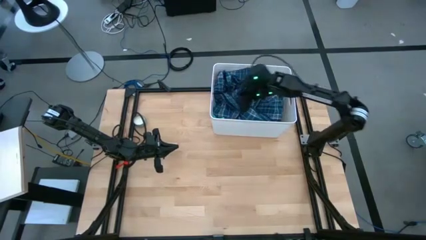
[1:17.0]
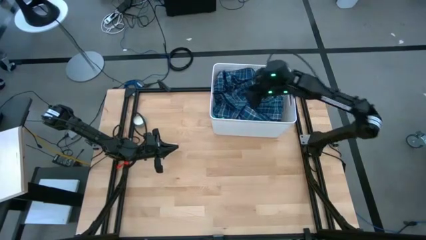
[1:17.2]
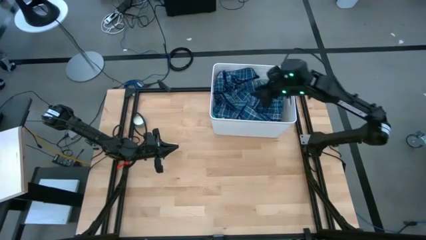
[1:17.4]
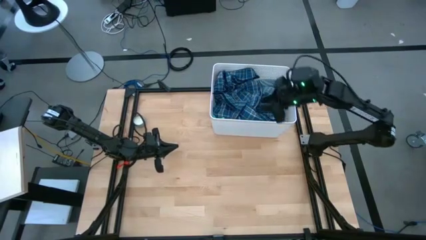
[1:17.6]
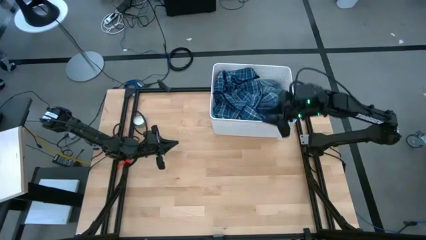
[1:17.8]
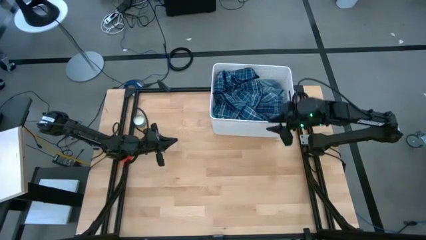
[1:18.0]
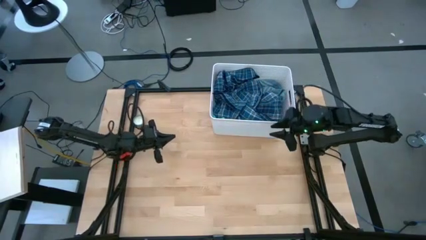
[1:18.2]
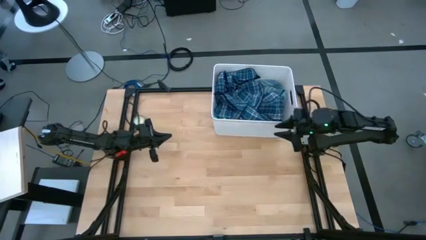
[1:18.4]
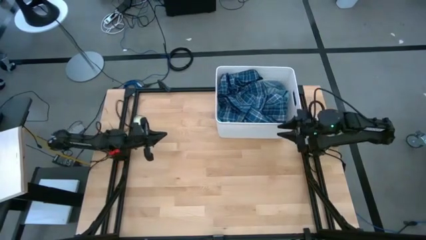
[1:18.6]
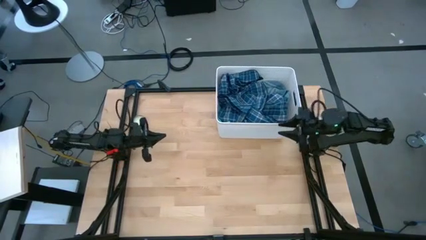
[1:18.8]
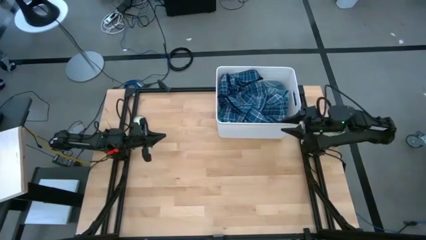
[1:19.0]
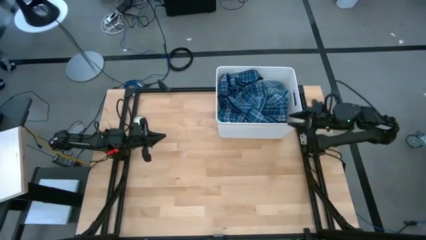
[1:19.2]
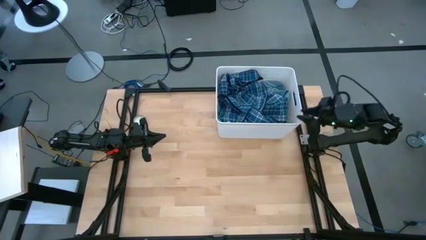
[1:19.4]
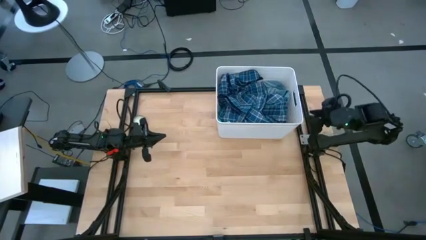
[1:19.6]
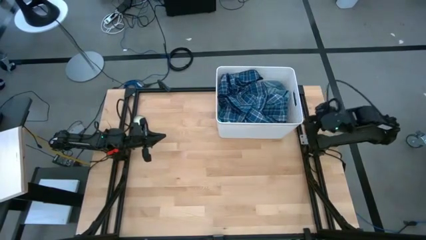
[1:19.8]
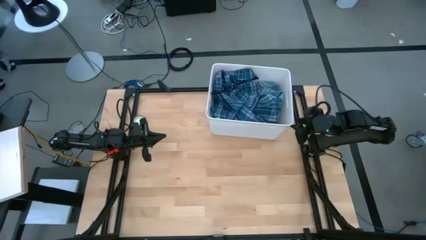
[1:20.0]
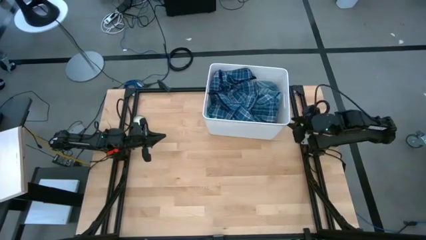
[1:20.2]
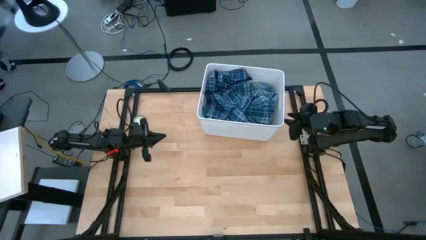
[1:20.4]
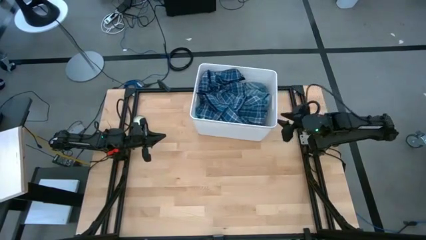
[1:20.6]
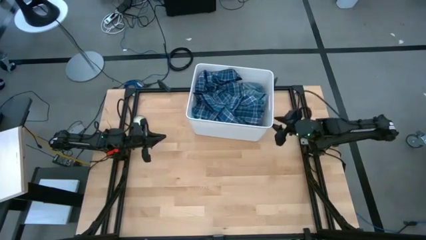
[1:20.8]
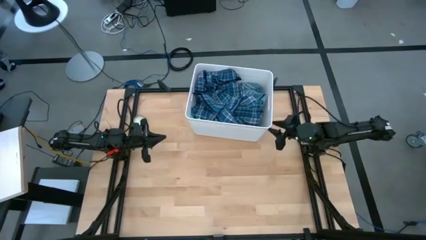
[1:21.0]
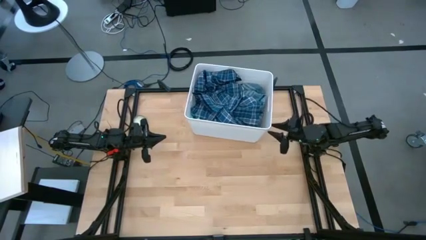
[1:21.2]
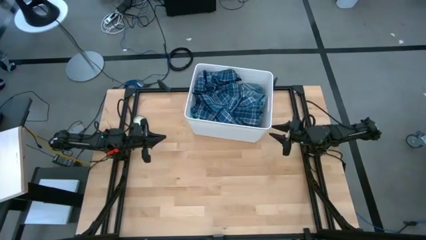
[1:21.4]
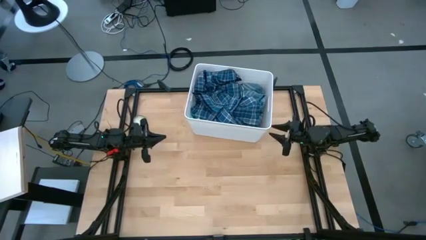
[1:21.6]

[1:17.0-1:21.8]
Task: Sort clothes
Move the white bin to the top center of the table

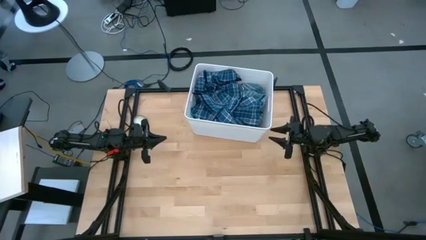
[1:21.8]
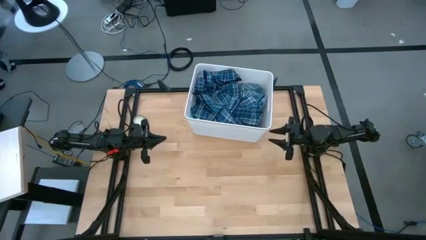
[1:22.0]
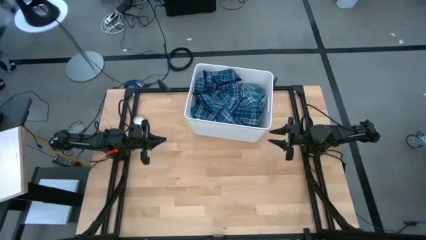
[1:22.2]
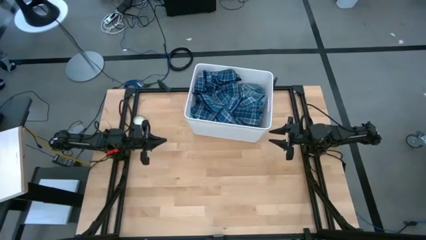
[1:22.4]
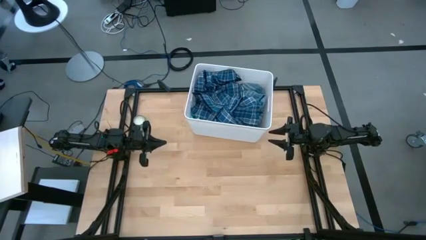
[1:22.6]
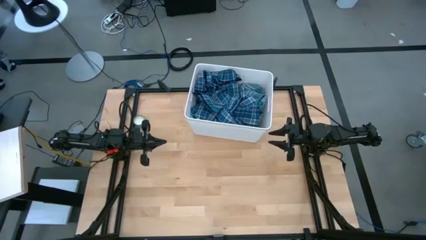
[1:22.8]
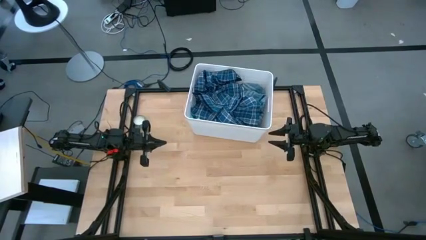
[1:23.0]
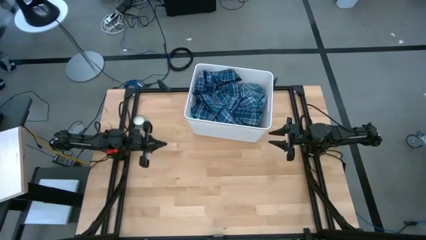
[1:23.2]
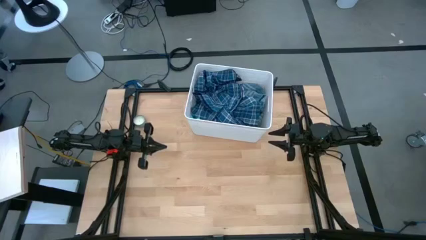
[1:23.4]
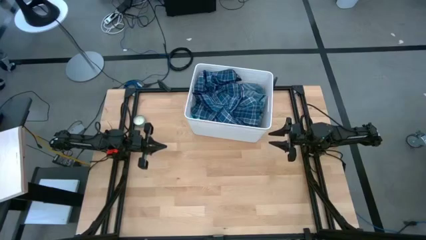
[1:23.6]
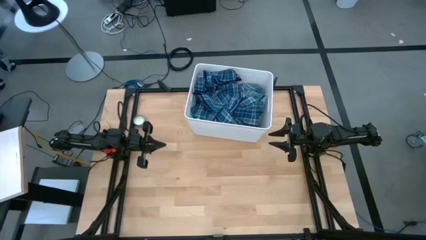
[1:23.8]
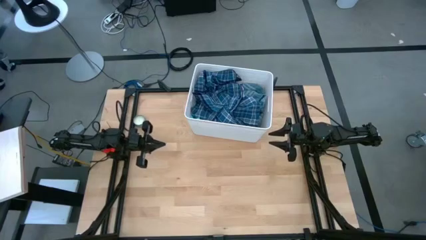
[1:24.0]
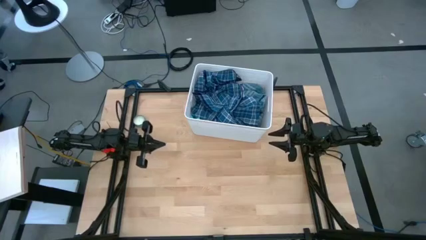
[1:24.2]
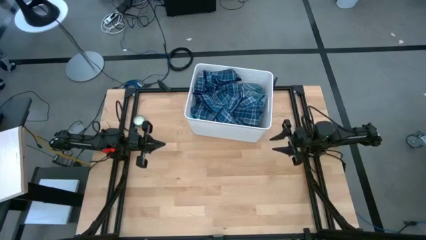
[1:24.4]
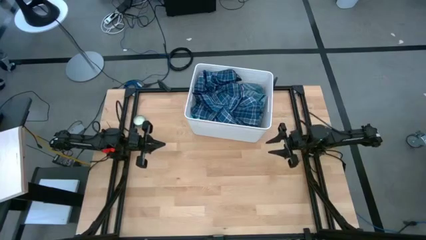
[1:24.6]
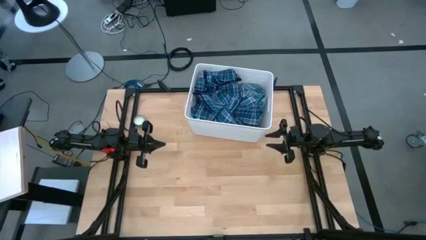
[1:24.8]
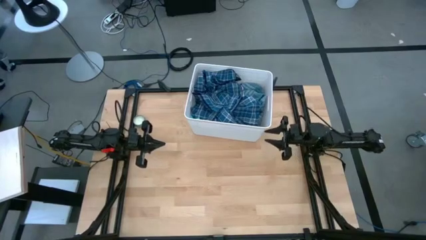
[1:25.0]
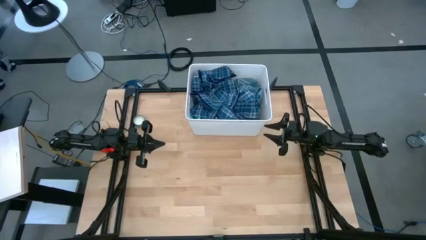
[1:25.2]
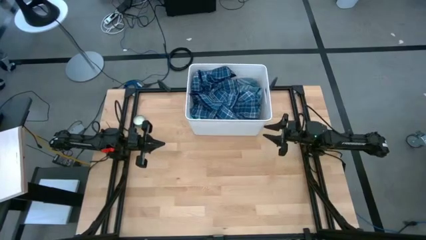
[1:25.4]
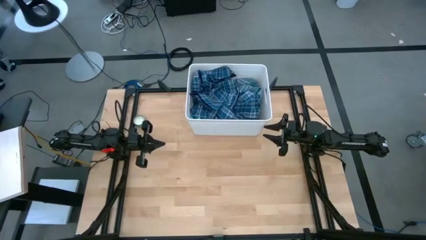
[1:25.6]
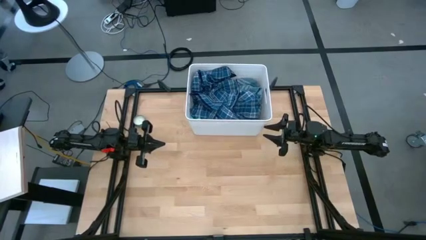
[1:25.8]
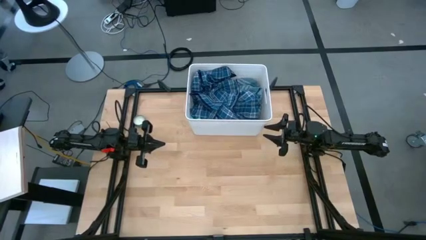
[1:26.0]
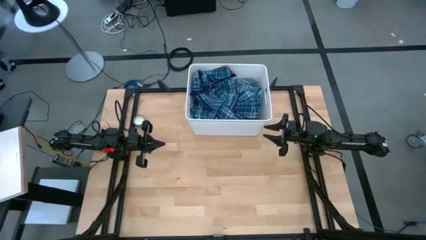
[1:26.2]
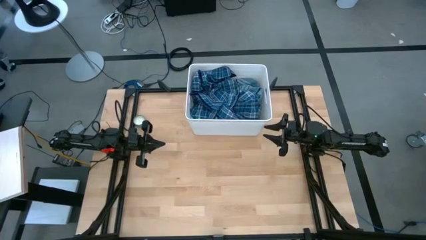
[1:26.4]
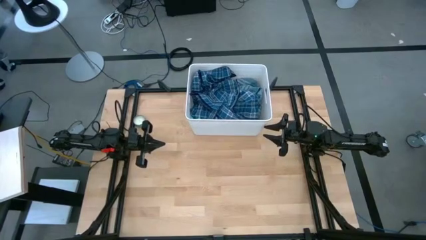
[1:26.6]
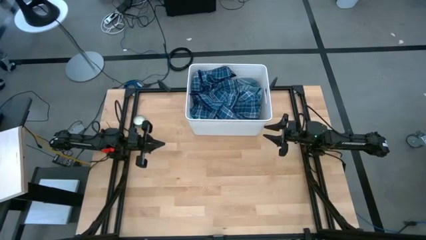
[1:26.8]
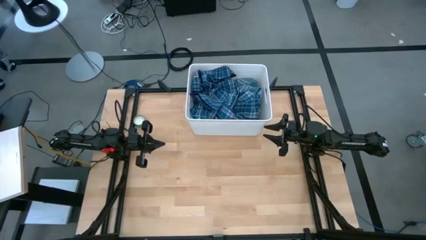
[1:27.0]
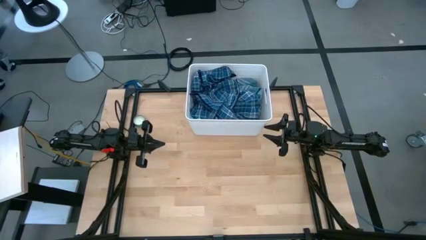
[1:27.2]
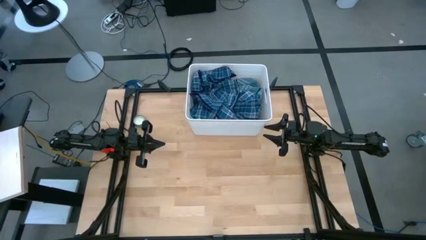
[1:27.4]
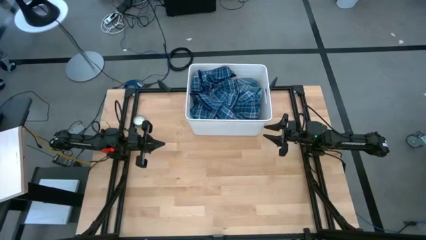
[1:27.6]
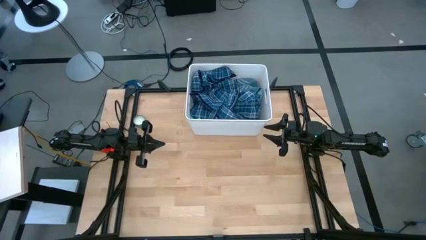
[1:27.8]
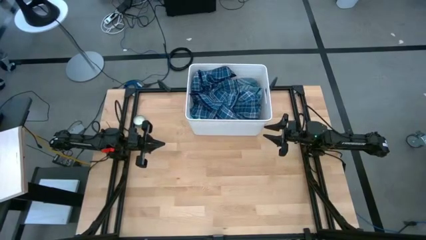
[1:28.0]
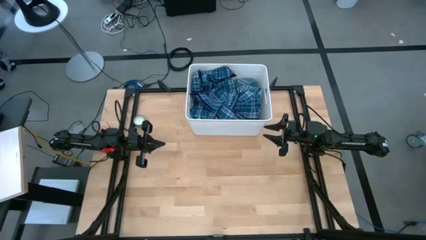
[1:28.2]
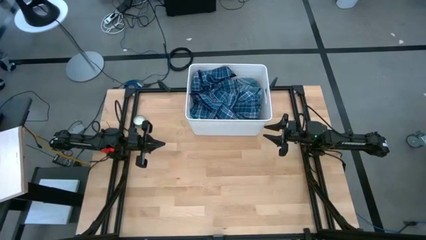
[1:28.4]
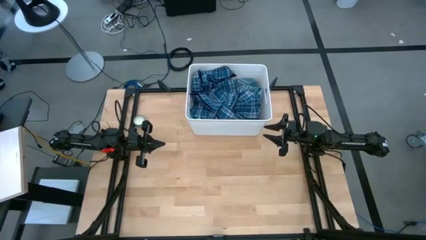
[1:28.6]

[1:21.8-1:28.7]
Return to Home Position

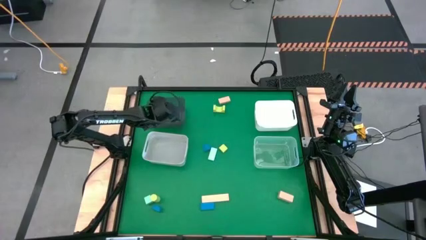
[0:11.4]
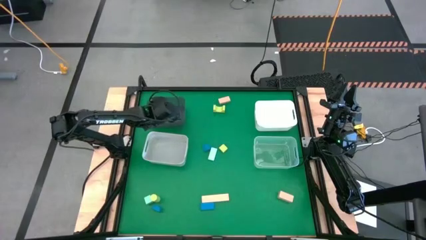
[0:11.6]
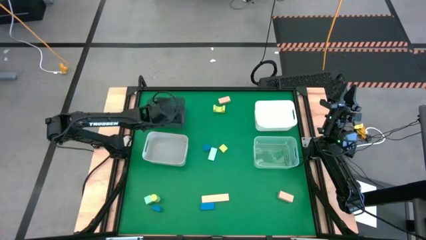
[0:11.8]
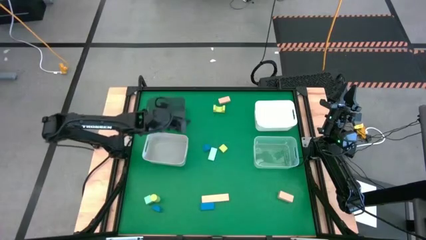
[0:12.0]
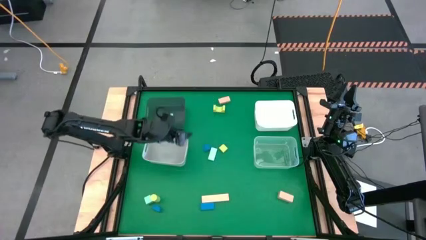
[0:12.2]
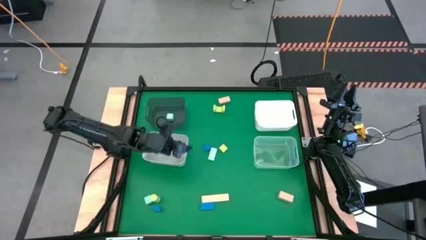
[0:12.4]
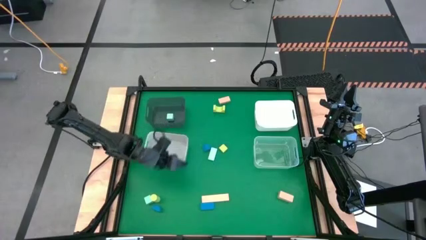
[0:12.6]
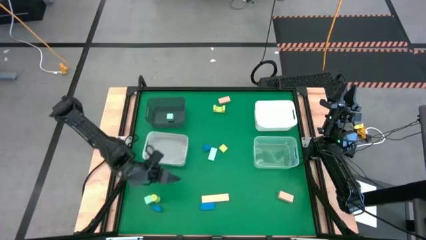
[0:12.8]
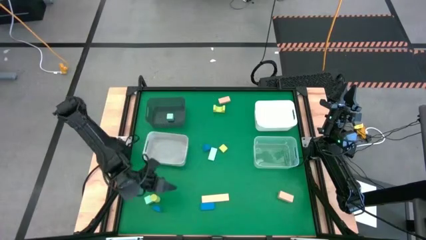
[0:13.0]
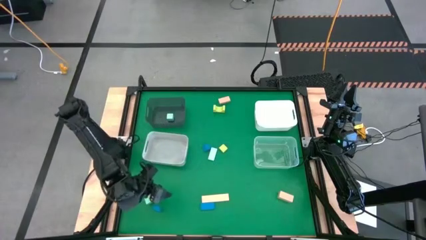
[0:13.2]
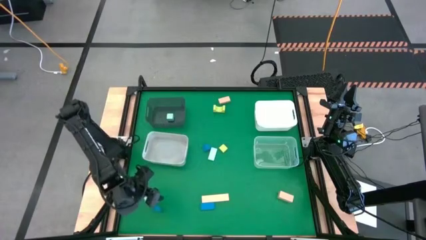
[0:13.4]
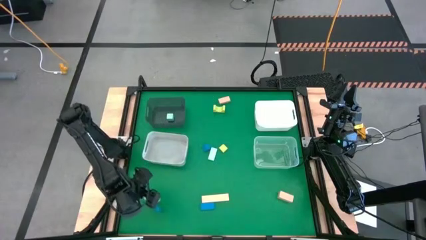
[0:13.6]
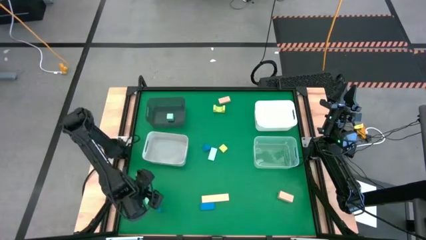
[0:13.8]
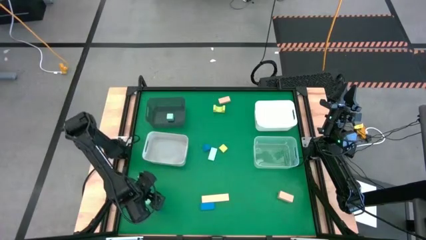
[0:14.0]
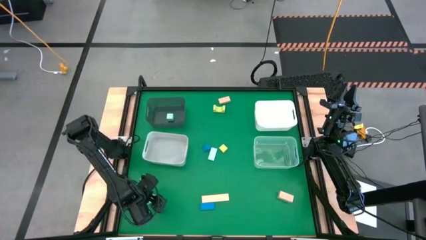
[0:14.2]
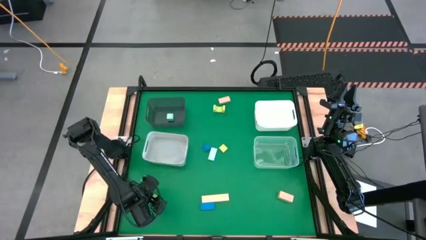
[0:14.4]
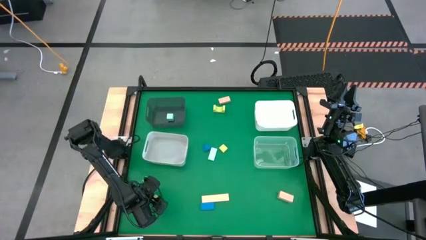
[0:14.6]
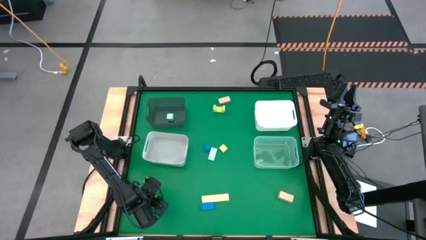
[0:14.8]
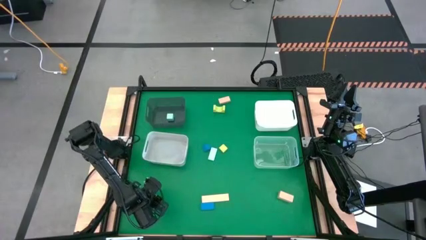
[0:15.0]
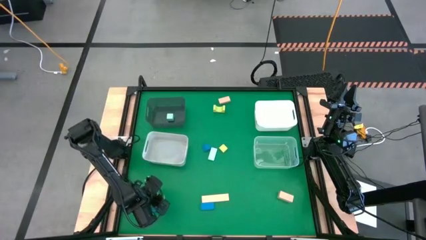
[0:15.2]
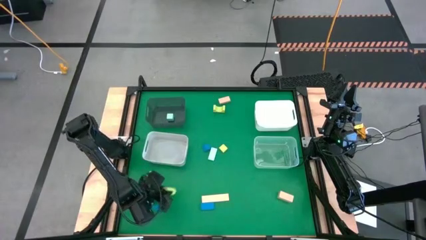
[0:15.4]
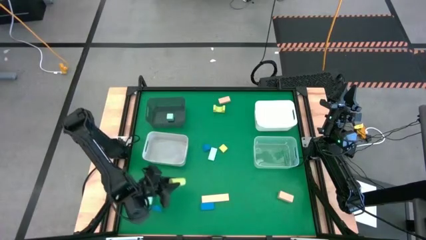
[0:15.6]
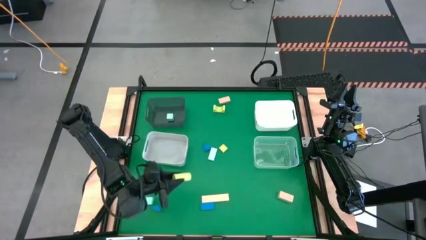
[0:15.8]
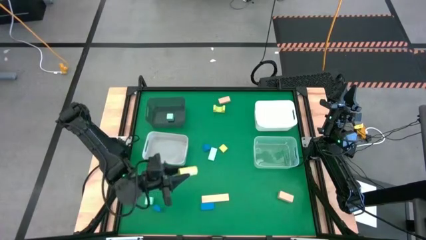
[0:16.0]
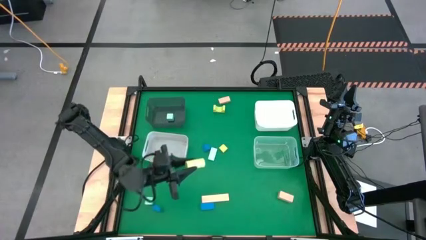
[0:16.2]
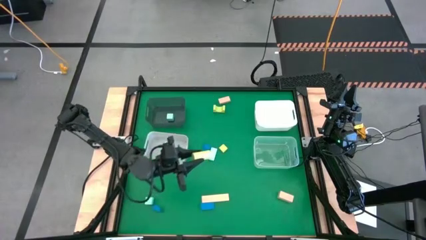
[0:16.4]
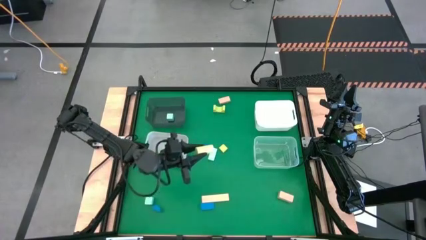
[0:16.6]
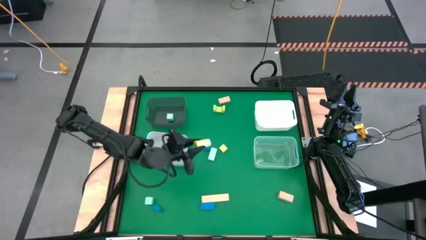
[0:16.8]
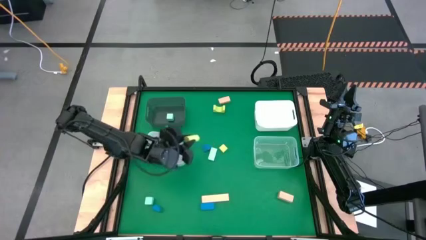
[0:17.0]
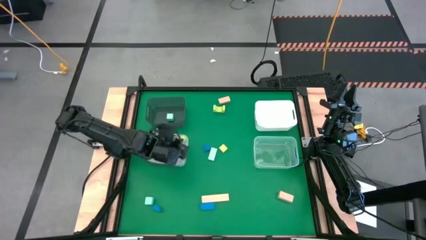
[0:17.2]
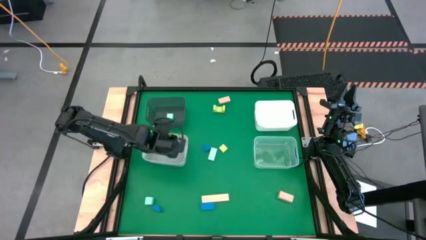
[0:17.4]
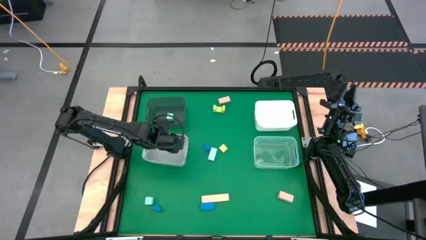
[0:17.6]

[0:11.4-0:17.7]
Task: Sort & place blocks by color
Put the bottom green block into the gray bin
